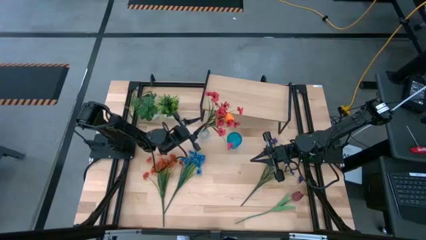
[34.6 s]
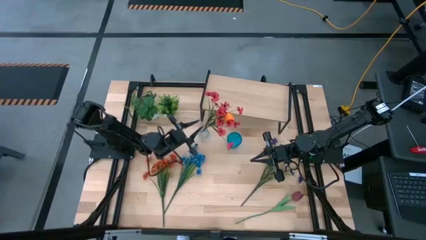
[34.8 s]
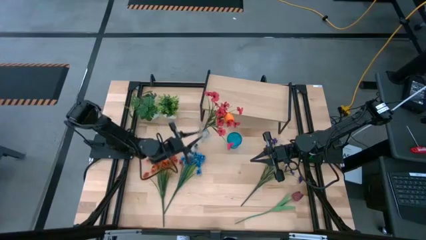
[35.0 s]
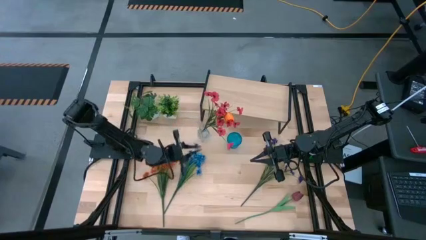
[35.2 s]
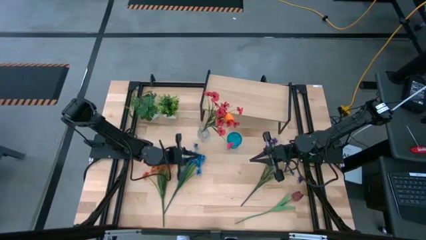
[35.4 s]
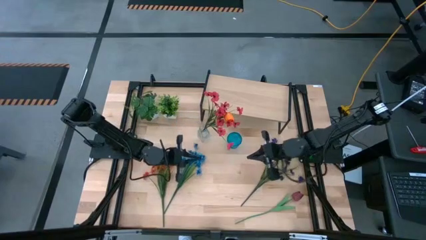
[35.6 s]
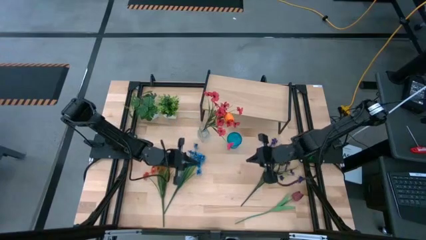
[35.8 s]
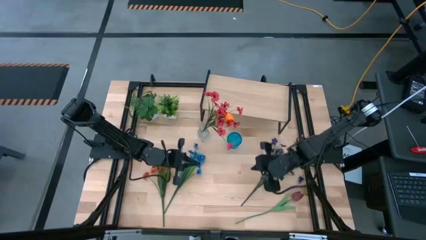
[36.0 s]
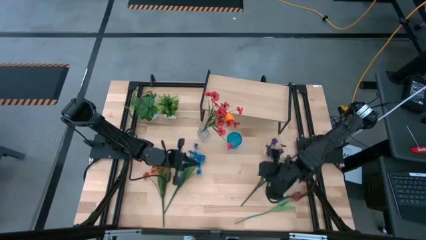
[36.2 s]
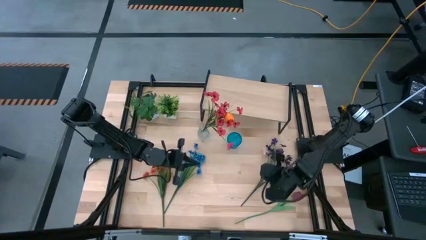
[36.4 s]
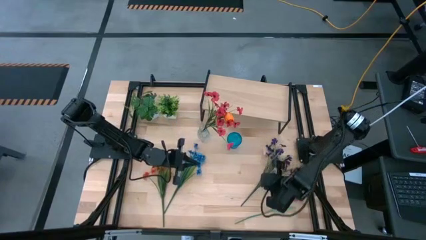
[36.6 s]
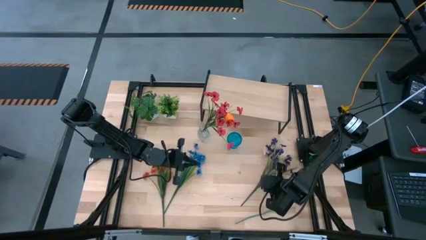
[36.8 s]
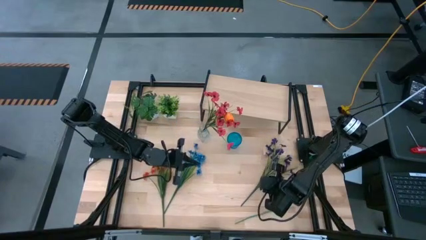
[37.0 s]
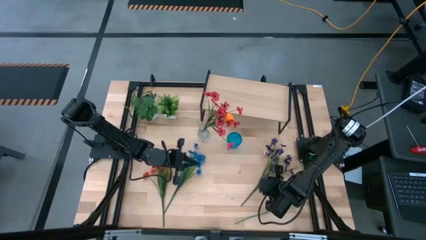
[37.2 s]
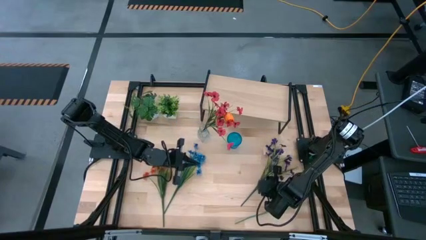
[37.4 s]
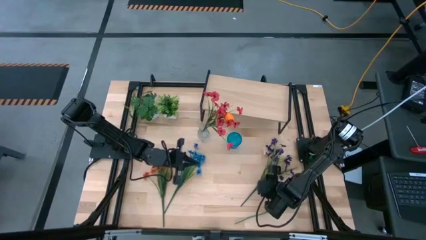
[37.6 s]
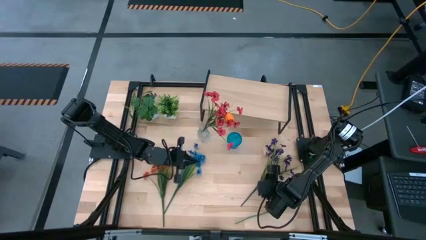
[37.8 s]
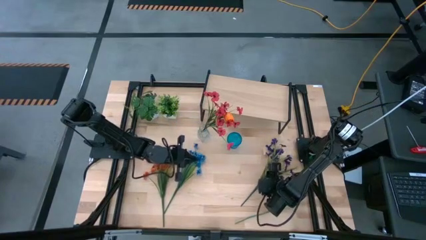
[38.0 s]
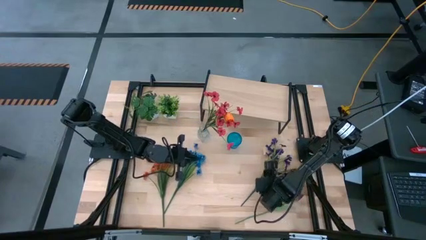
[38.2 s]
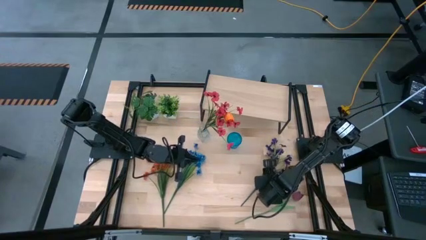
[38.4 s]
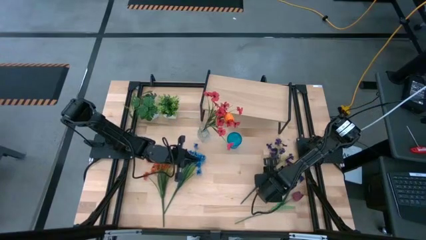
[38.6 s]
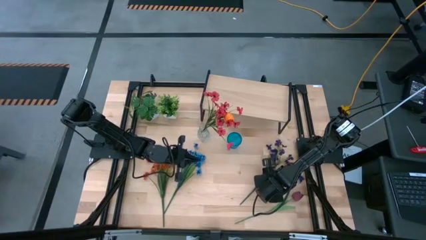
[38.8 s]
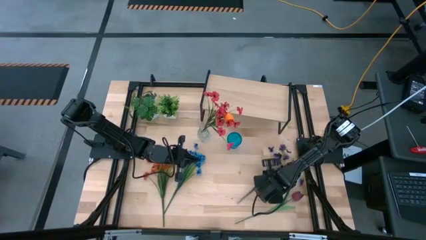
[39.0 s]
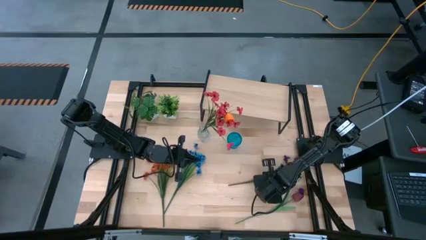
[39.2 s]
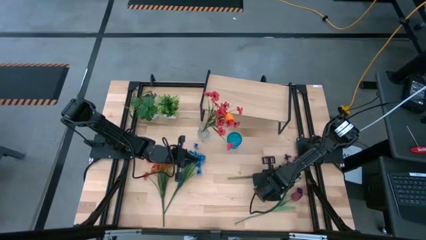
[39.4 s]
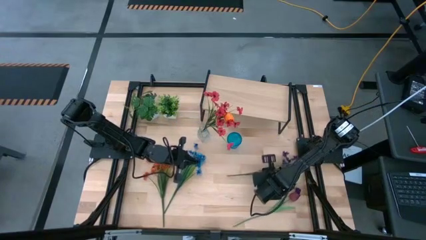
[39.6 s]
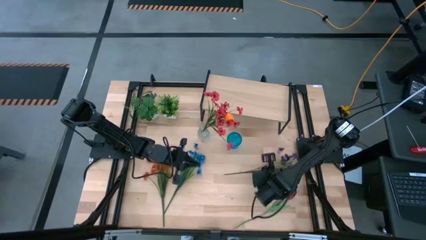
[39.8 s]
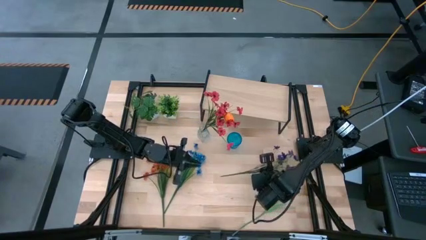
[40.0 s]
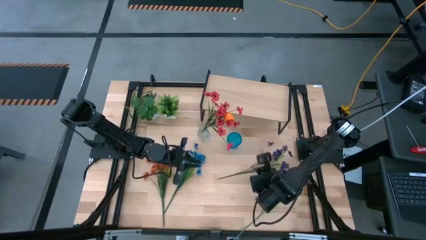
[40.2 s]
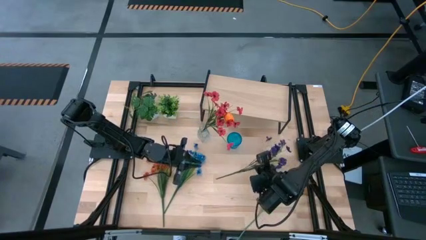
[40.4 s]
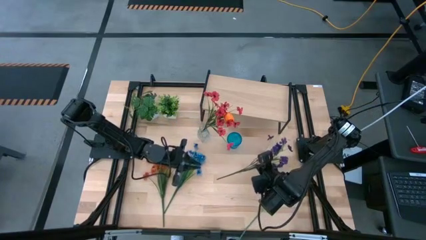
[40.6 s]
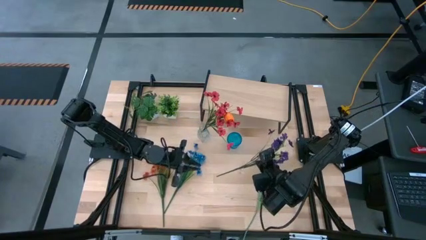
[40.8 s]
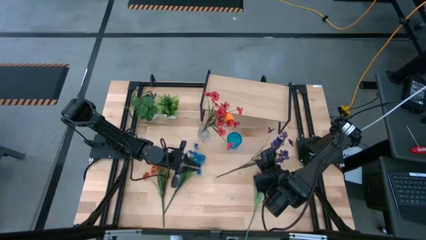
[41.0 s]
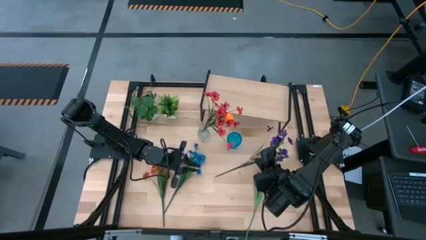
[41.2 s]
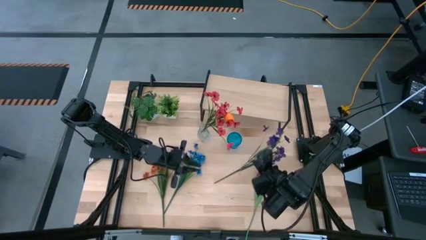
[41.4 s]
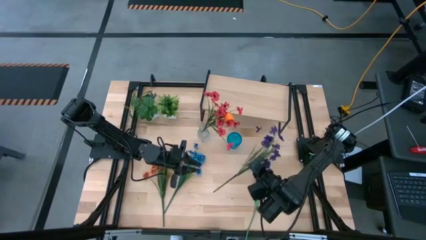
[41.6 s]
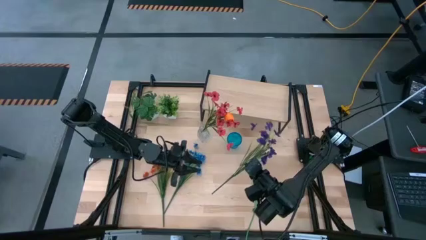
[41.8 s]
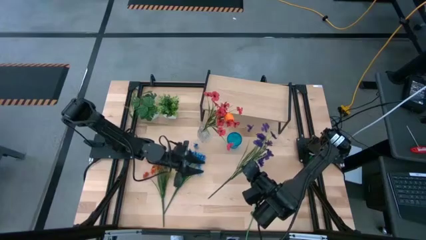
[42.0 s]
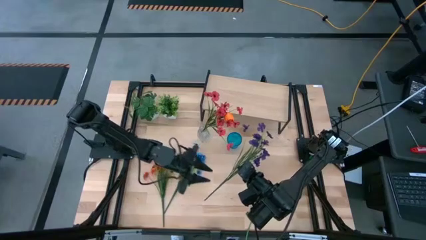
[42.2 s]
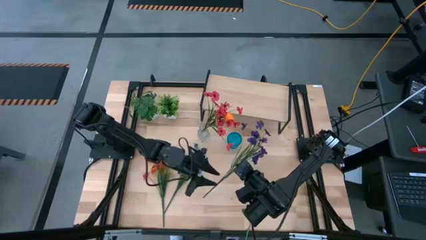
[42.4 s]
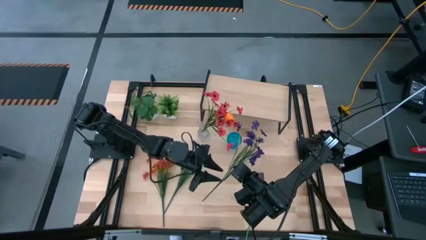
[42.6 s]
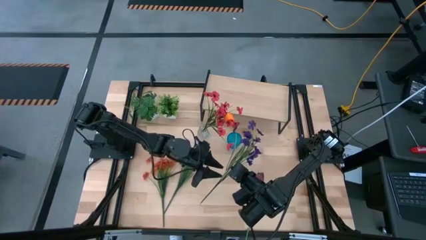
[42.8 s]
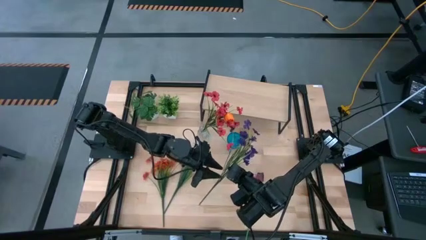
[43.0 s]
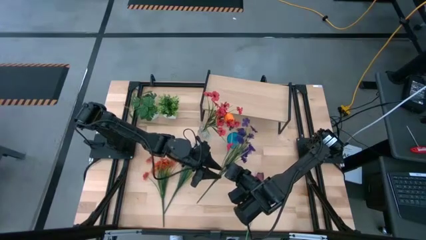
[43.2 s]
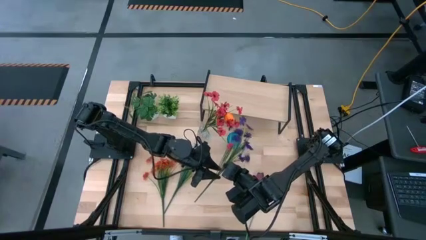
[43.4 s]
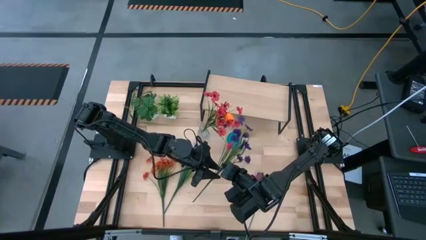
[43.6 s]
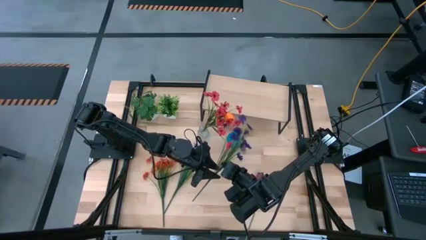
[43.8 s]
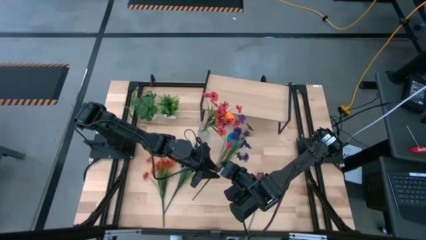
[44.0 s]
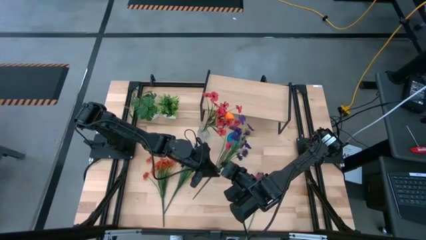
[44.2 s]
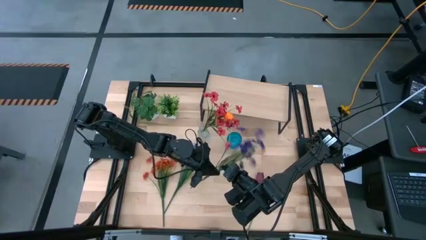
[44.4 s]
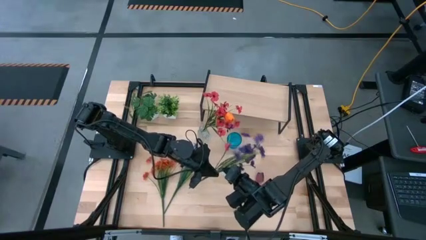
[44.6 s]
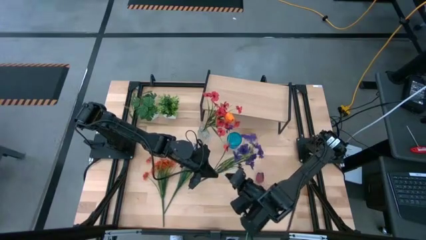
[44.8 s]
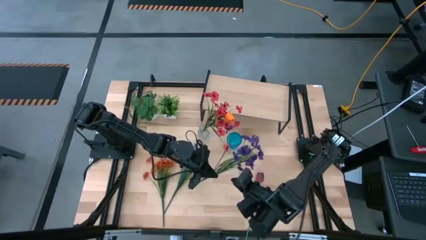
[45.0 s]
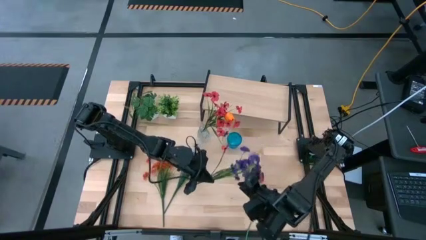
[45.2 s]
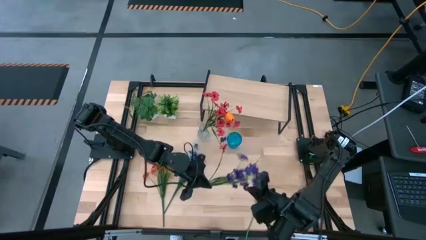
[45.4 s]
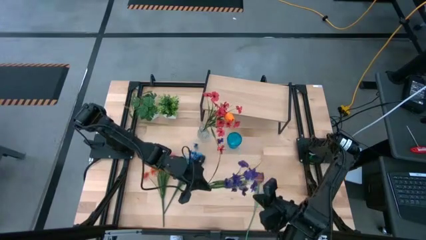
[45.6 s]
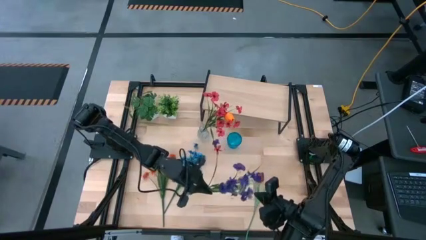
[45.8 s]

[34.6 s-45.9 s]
Task: Pick and place flowers into a vace then onto a shelf
Put the purple flowers into the transparent vase
